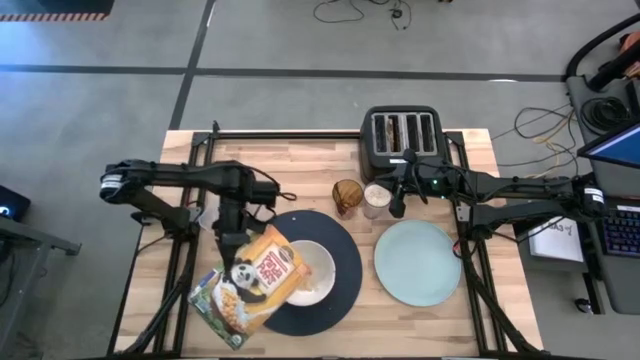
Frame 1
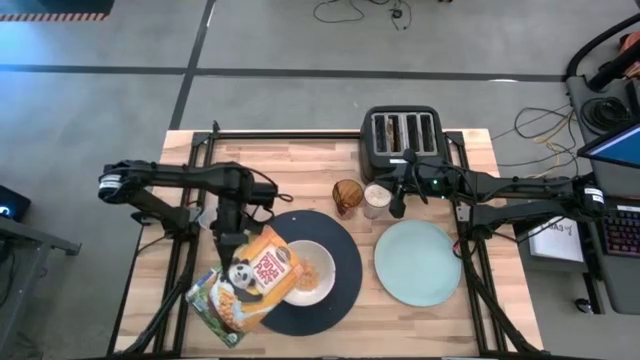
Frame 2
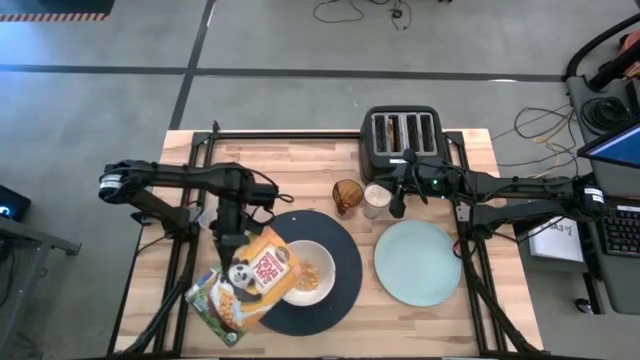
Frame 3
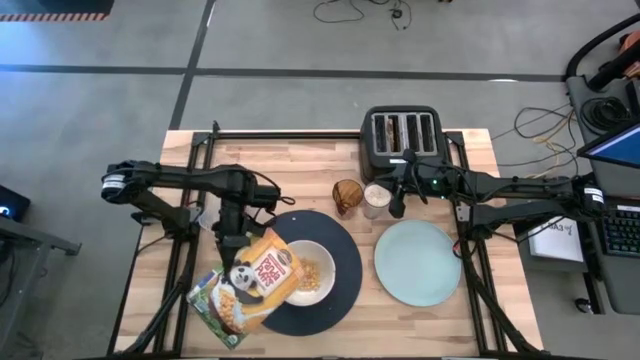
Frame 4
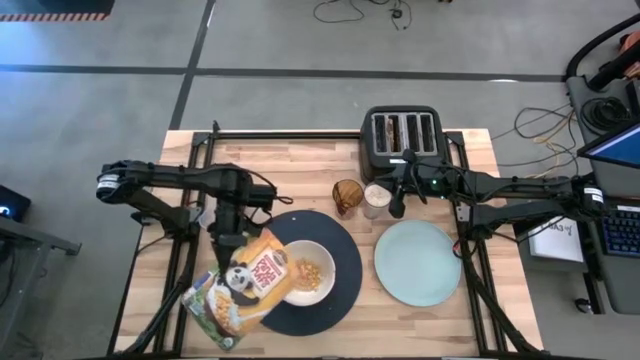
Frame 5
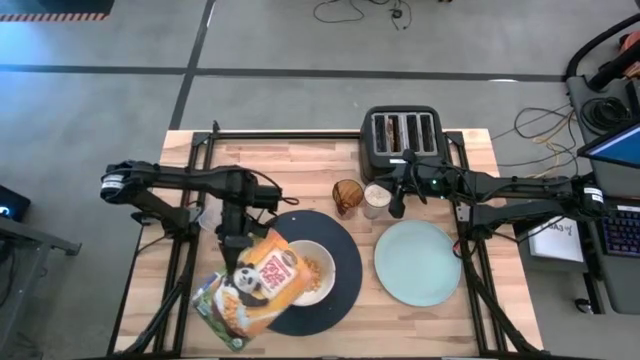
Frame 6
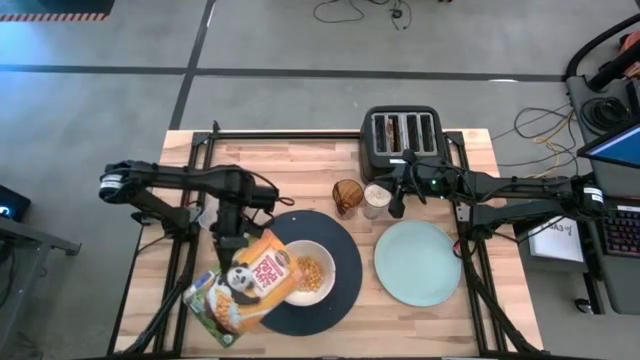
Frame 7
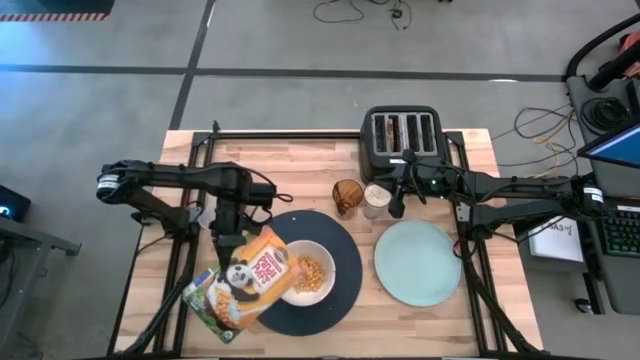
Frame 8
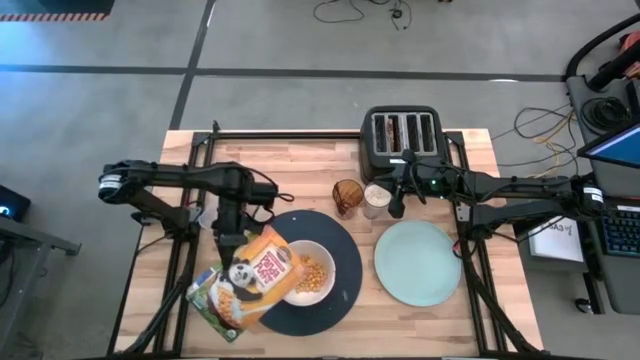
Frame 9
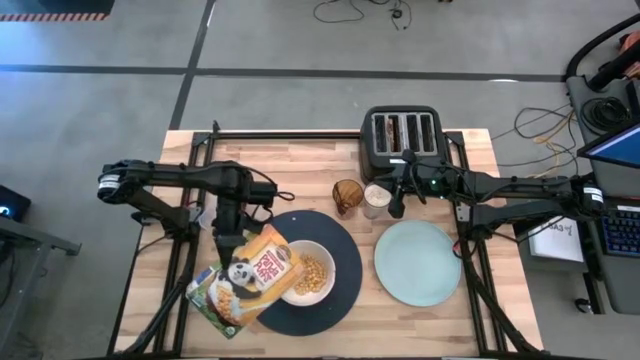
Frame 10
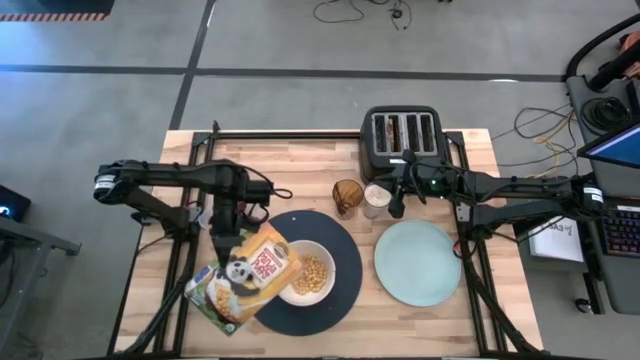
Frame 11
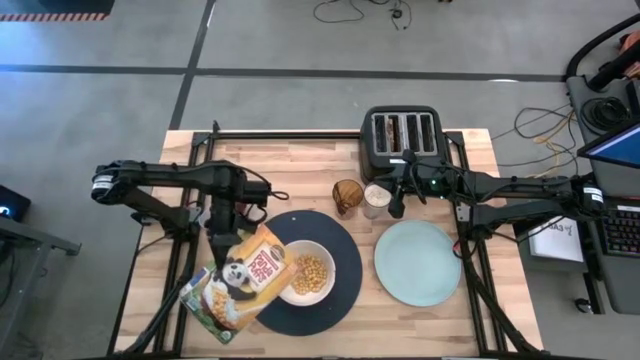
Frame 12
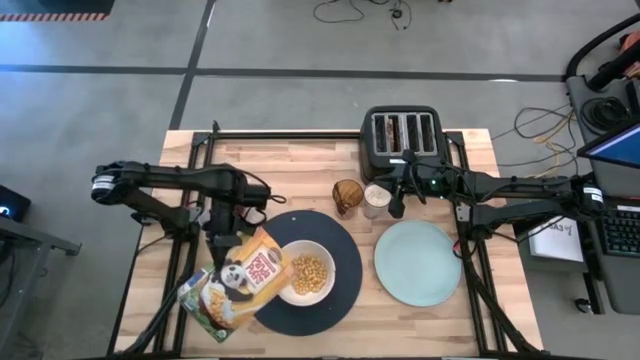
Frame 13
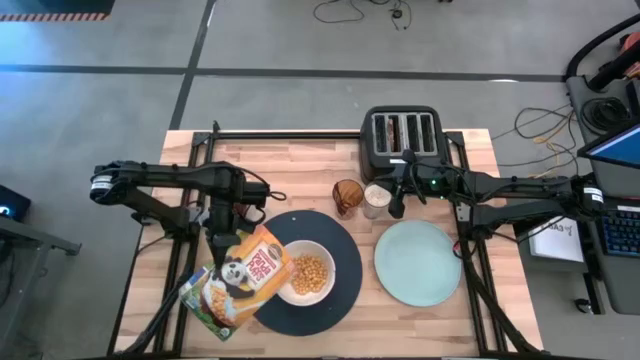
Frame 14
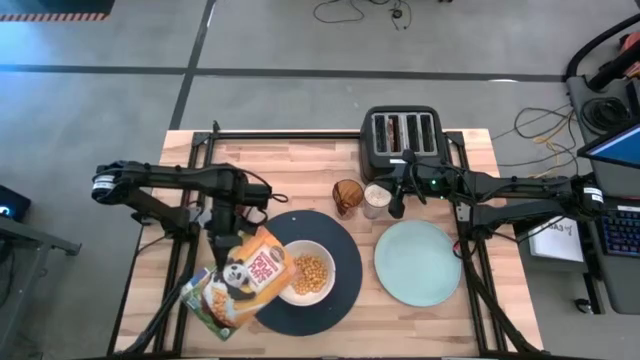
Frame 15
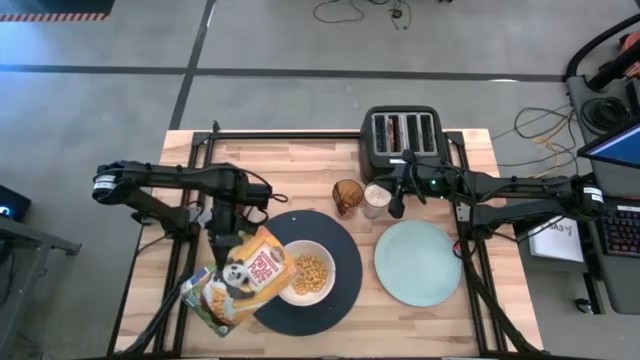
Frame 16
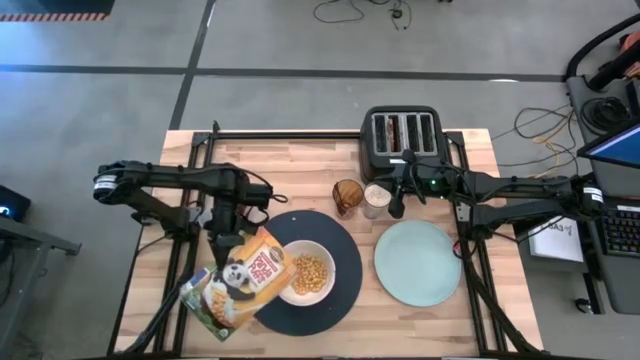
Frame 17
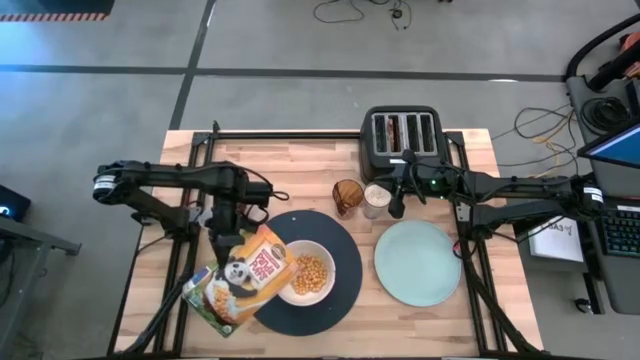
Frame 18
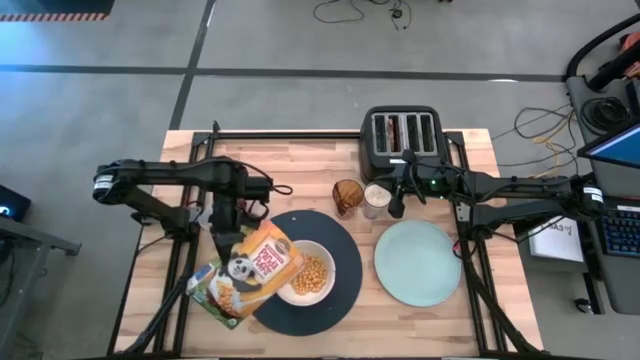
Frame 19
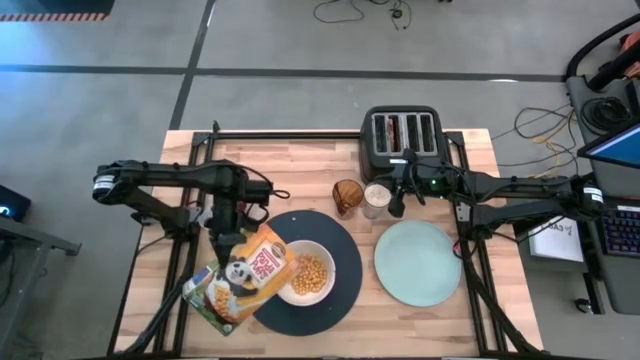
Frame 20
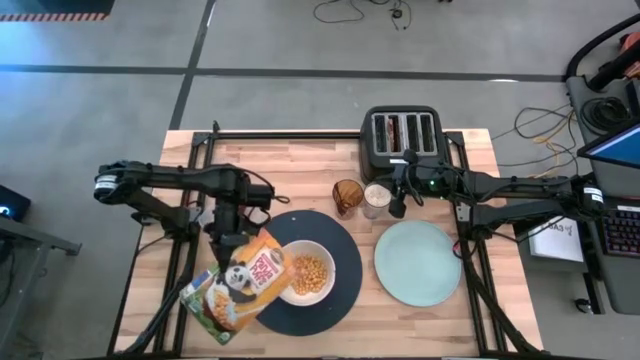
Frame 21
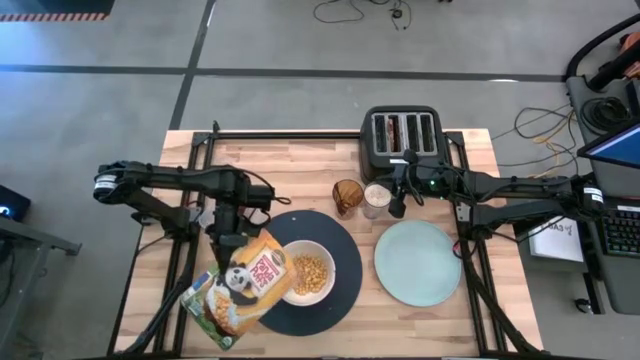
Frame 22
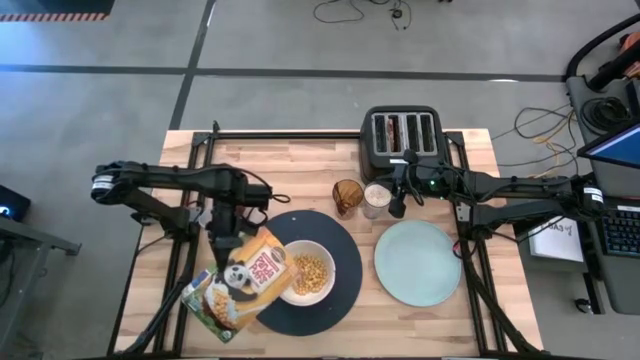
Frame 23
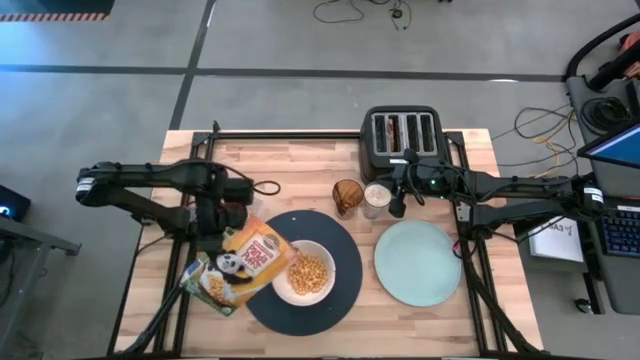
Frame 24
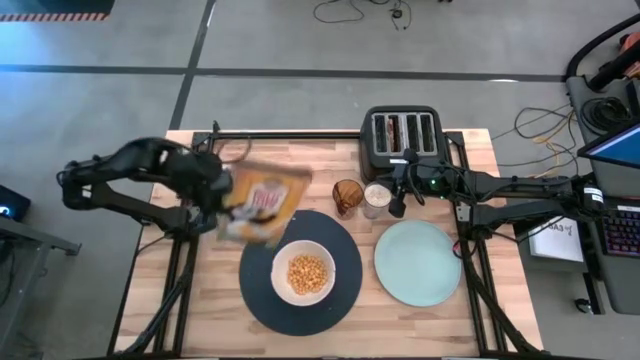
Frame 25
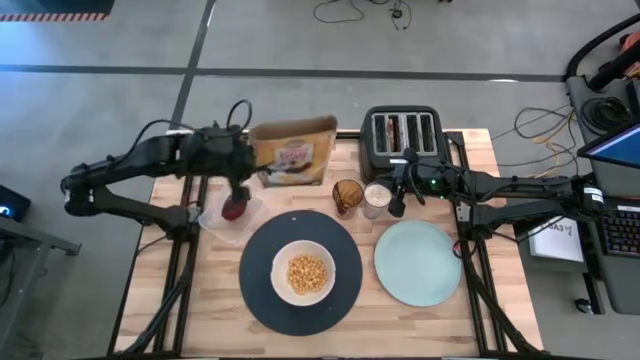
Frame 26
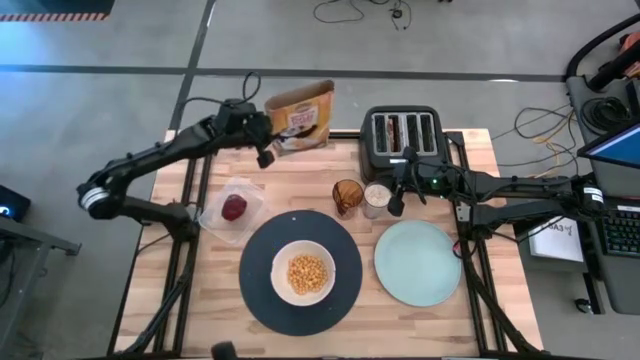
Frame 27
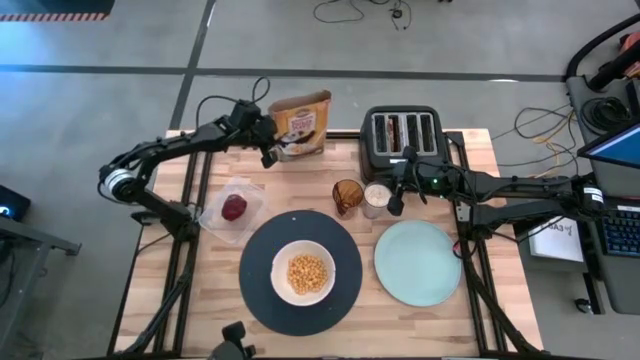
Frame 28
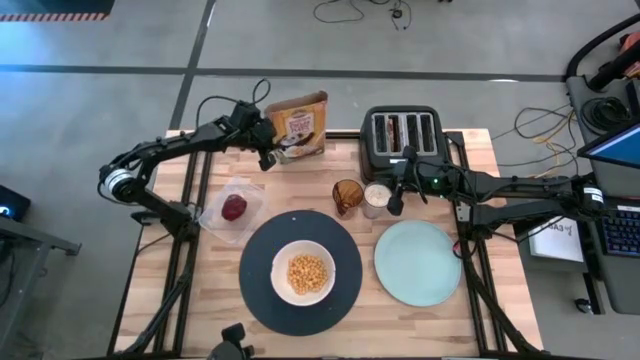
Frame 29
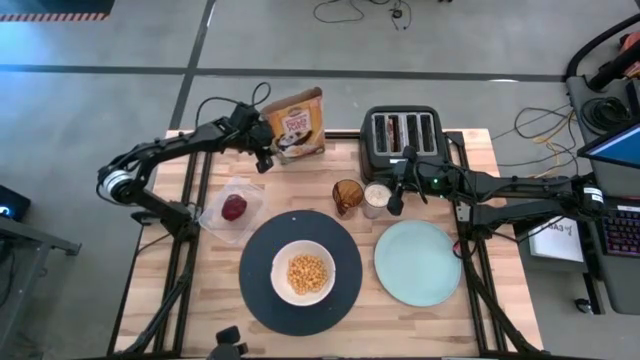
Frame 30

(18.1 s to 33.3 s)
Task: Arrange a breakfast setting
Pour the cereal from the yellow box into the white bowl

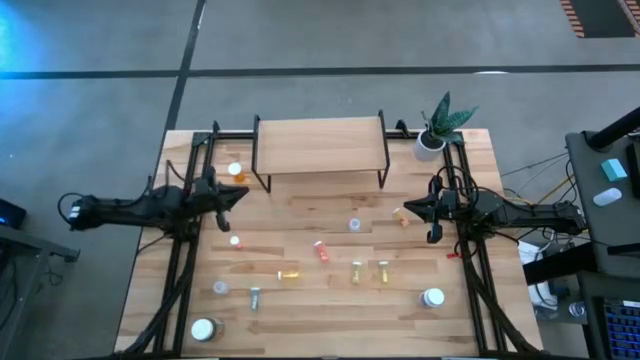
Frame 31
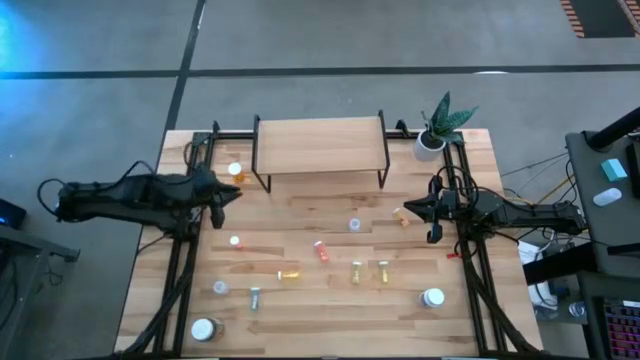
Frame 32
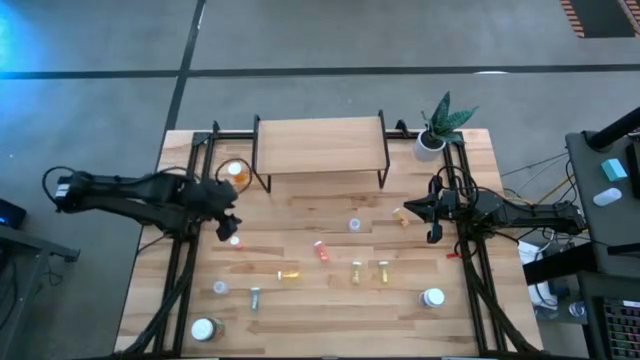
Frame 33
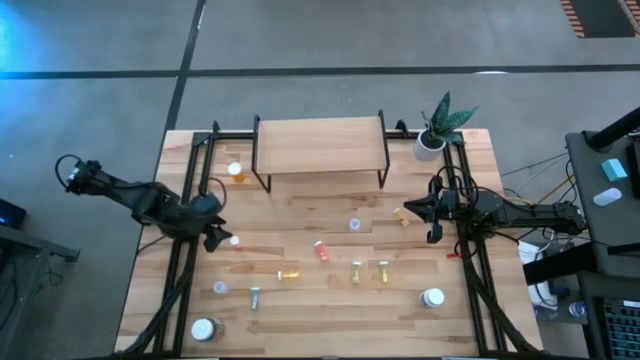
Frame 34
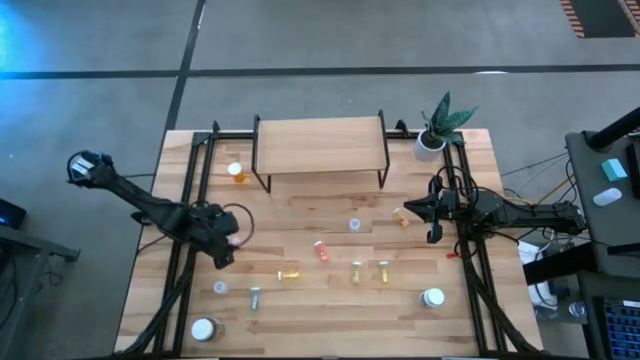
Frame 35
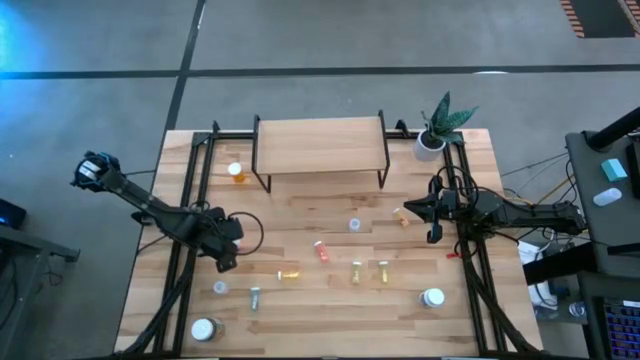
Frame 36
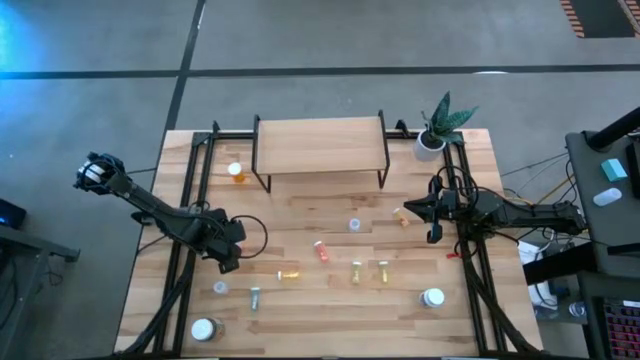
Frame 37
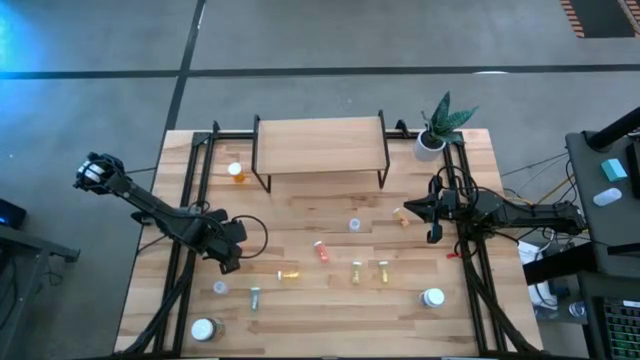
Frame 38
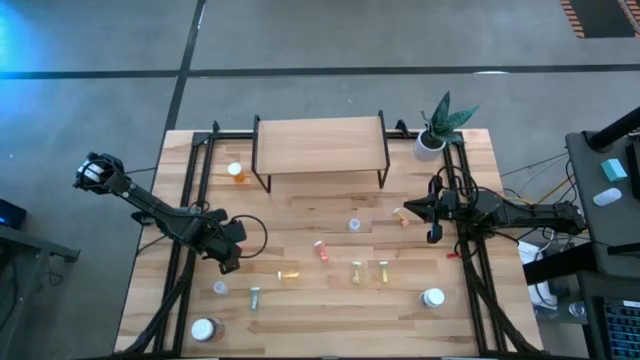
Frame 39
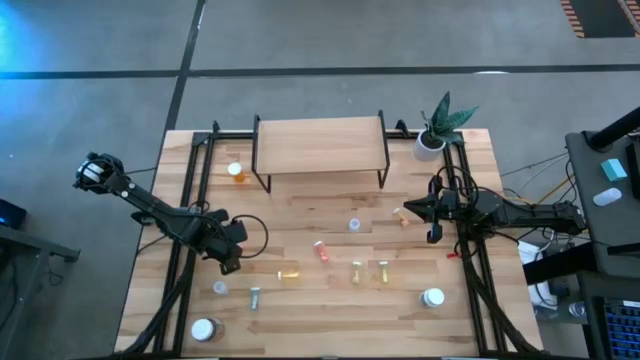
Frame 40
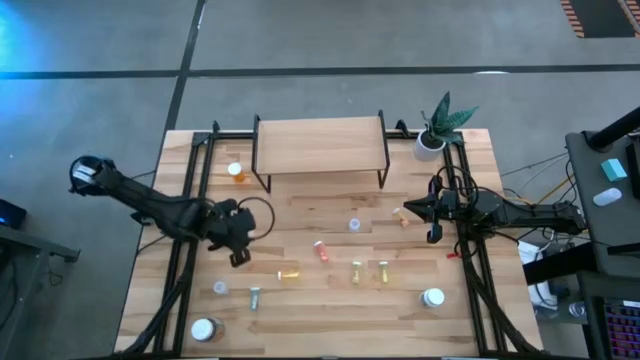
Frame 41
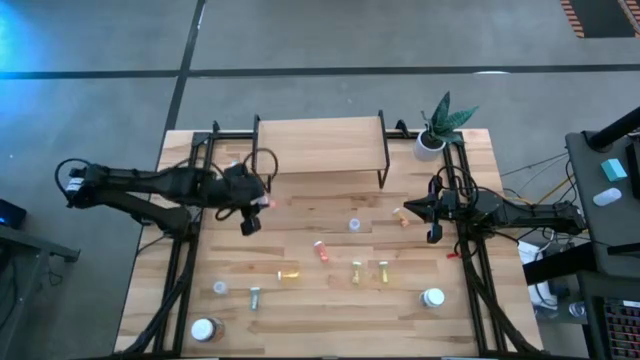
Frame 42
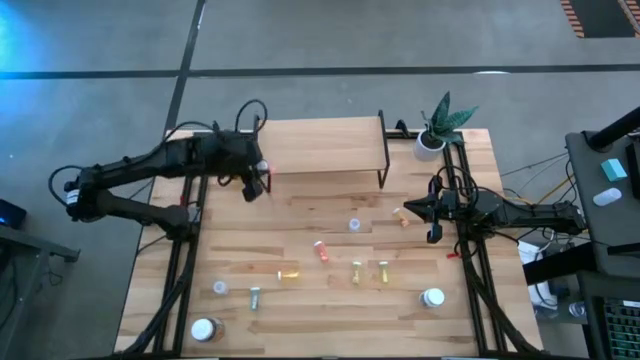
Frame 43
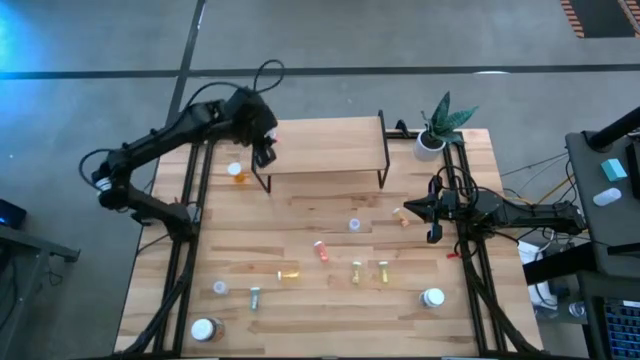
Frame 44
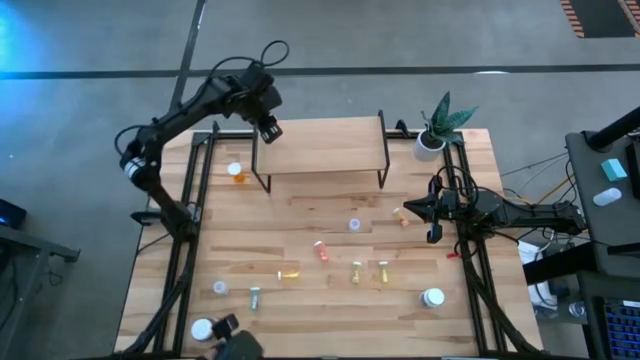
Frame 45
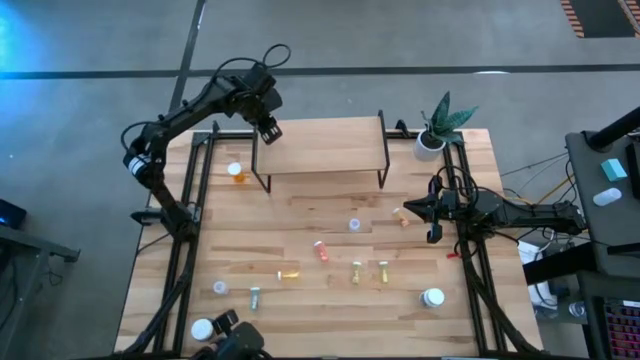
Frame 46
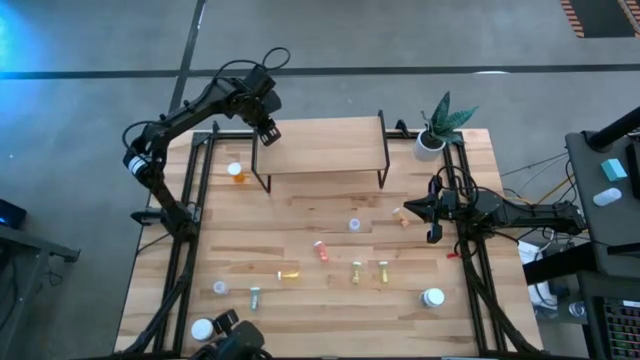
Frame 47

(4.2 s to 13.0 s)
Task: Pick and place medicine bottles onto shelf by color
Put the left pink pill bottle on the shelf
